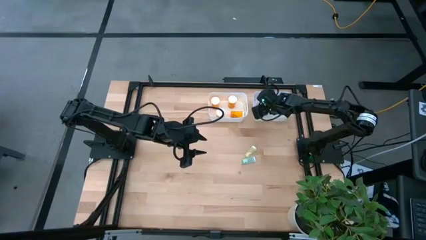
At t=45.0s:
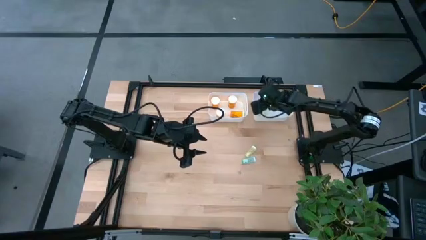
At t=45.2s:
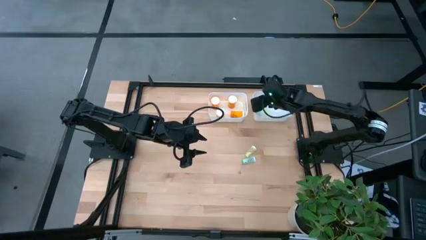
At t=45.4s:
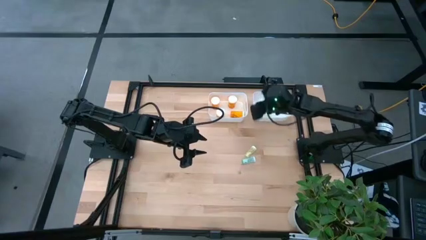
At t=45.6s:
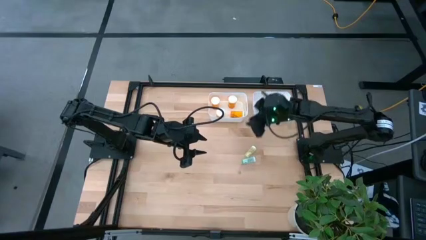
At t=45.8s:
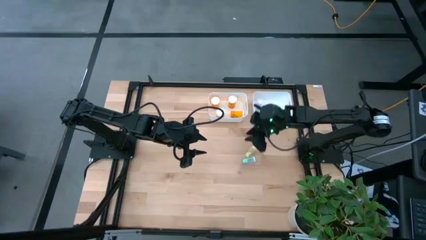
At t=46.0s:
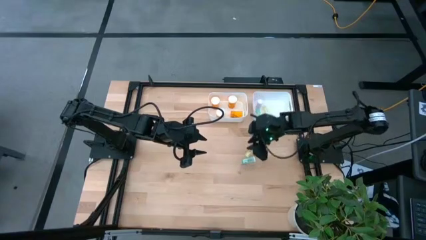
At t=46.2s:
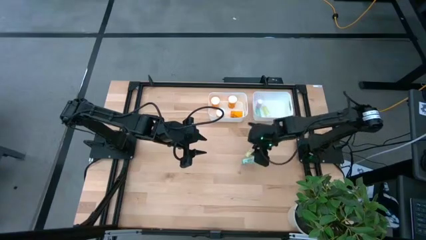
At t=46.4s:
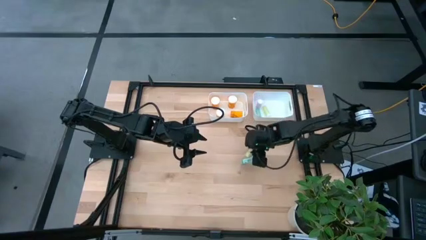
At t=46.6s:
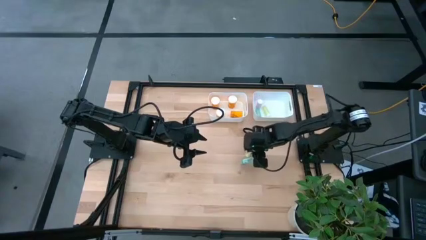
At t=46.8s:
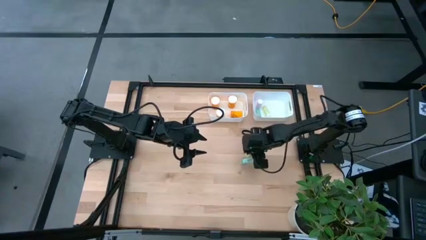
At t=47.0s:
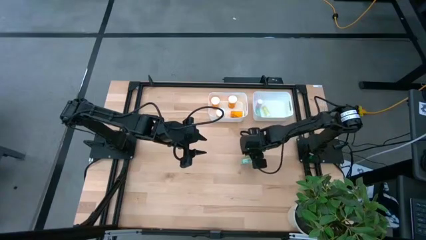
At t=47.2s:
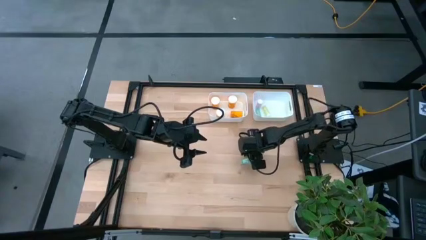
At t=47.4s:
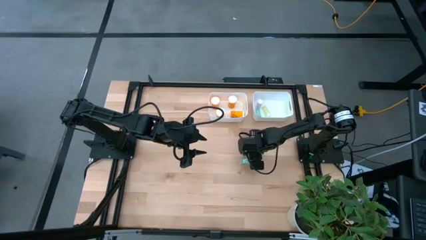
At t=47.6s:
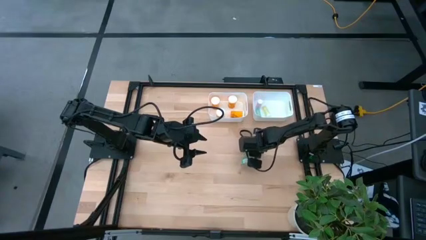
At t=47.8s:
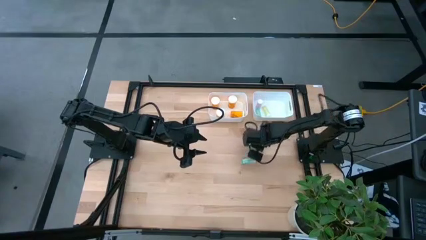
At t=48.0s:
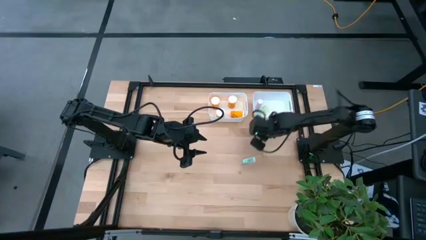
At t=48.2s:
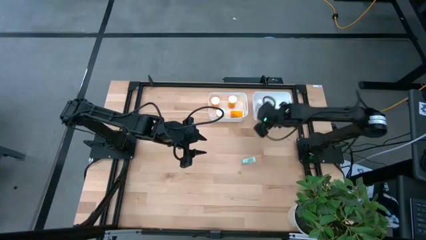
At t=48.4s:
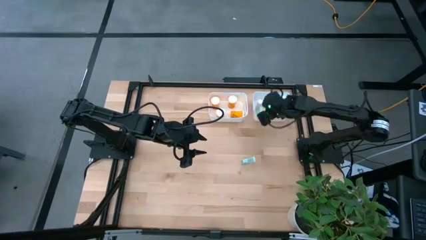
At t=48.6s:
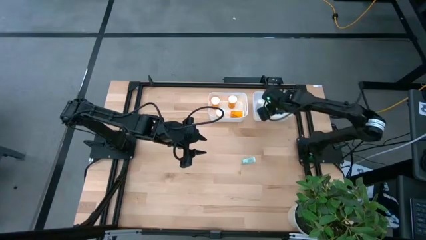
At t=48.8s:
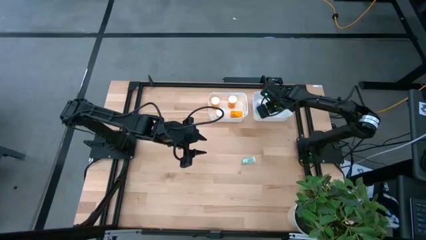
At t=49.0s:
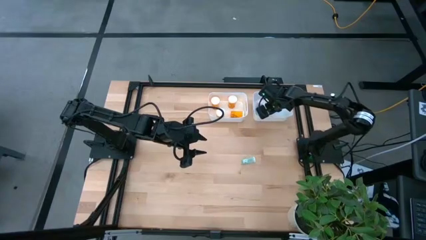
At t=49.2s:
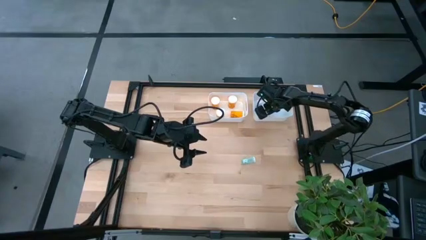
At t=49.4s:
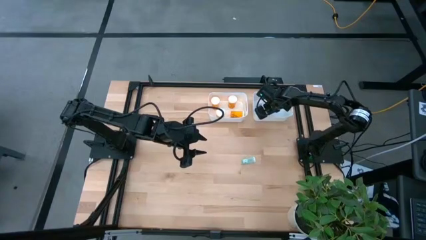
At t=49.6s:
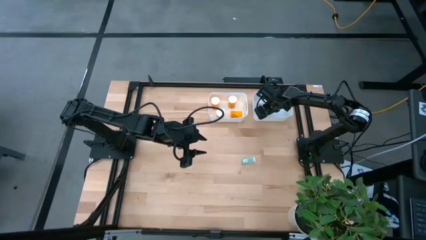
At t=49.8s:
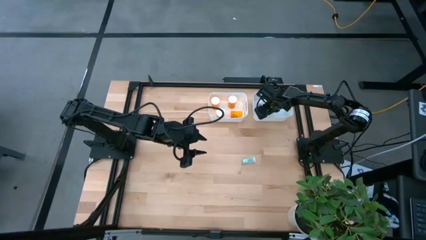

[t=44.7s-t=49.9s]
Task: Pick and place medicine bottles into bin by pill shape (circle, oval)
Put the yellow tablet bottle into the right white bin

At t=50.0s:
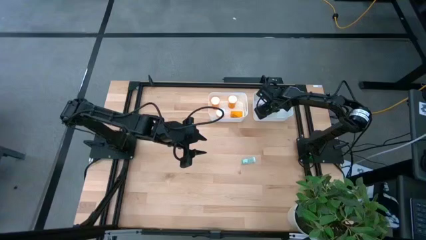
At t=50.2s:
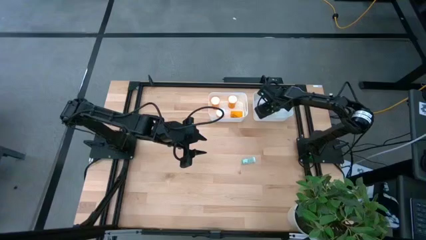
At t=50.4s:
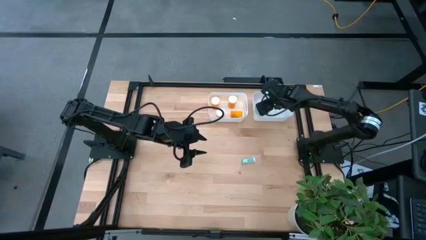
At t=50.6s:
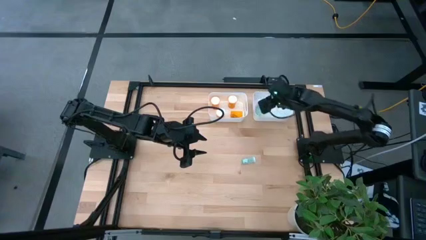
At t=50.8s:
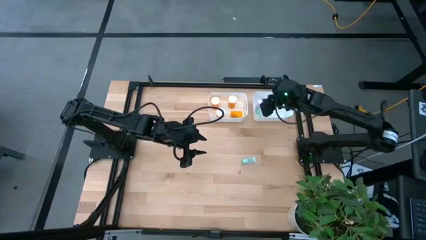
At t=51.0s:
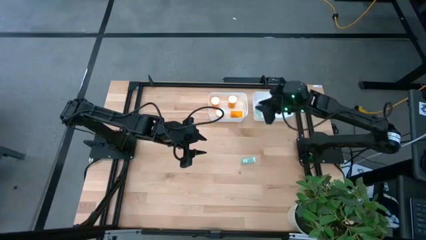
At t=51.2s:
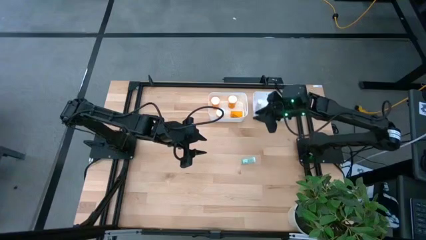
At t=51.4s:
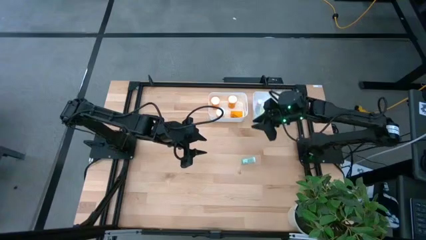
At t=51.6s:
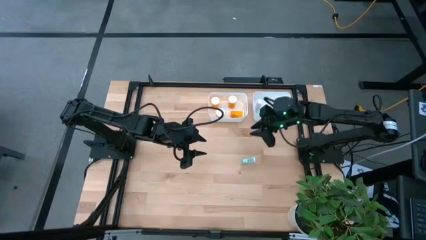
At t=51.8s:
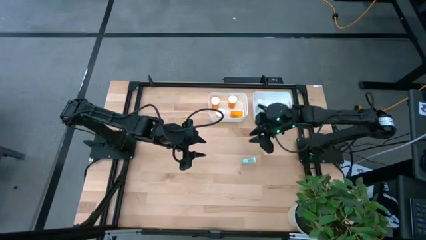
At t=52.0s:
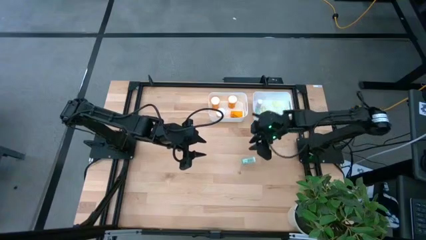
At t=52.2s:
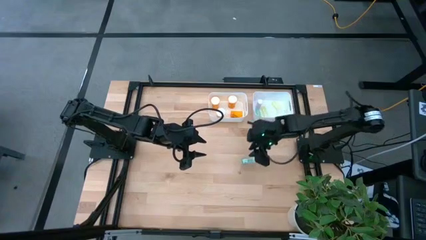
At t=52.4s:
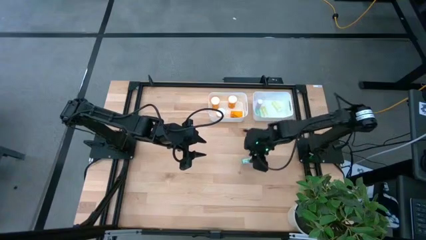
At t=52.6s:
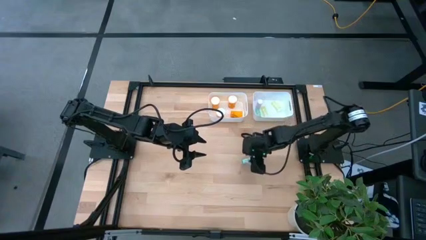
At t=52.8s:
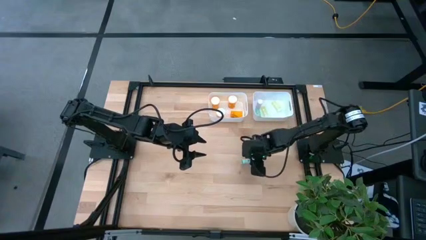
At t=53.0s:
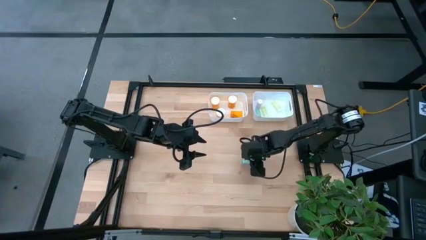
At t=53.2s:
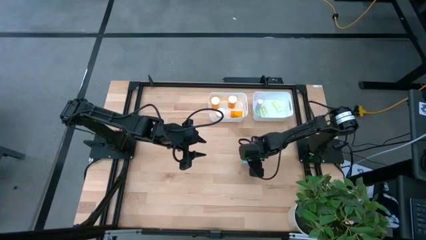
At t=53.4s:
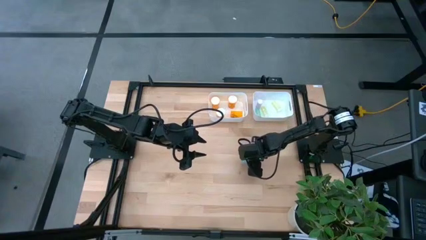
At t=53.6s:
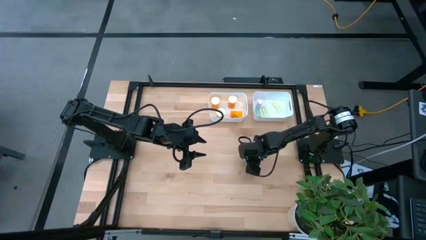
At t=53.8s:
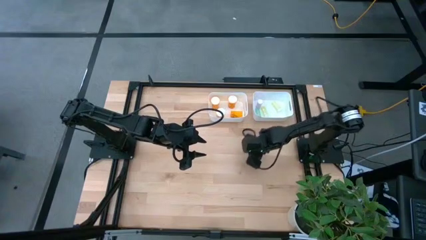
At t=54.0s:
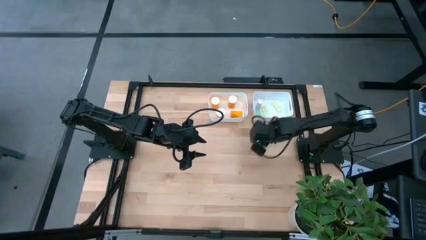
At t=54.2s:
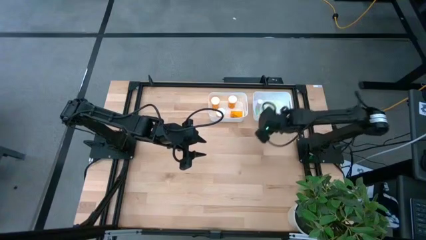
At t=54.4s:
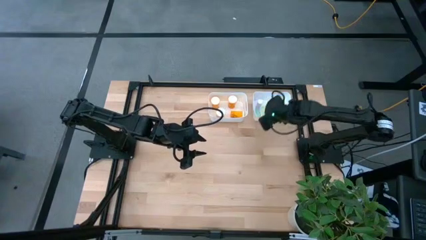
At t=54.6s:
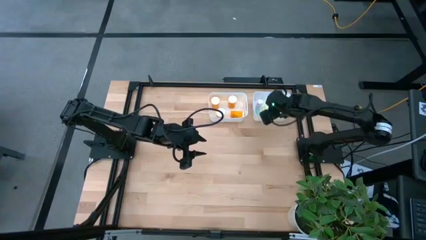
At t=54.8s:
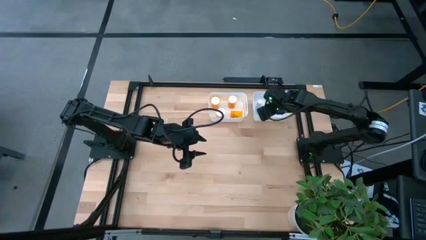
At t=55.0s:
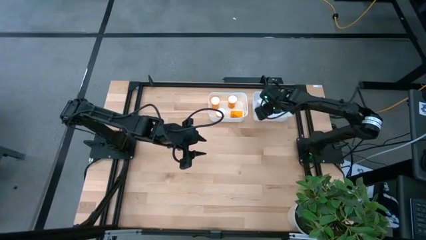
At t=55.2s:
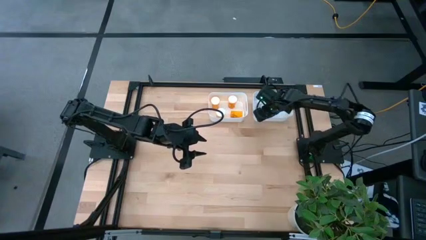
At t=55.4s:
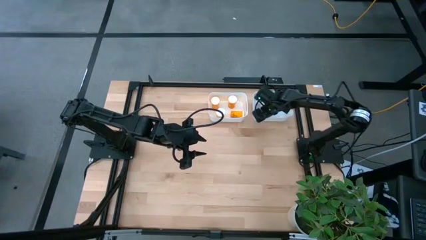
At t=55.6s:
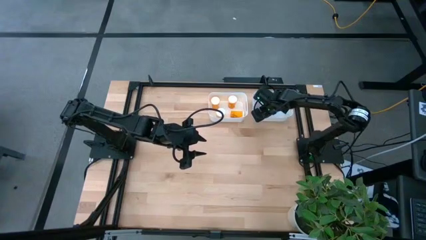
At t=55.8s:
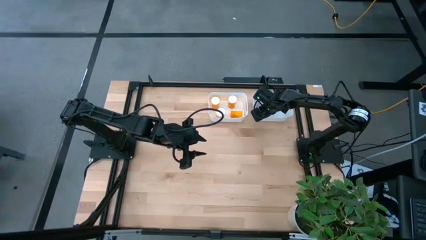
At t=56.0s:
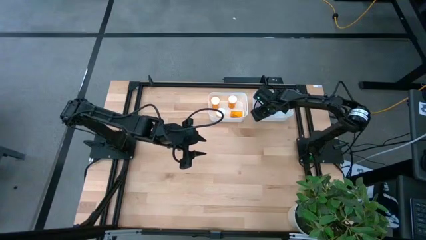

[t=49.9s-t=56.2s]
Put the blue tablet bottle into the right white bin

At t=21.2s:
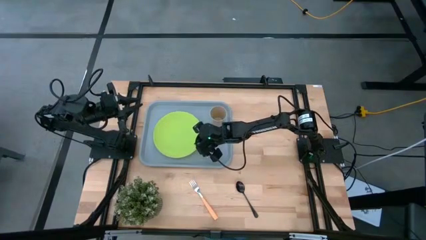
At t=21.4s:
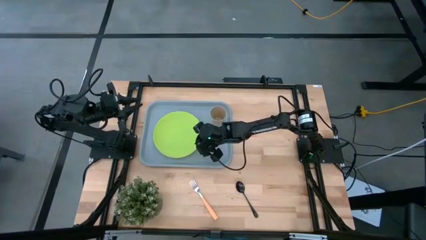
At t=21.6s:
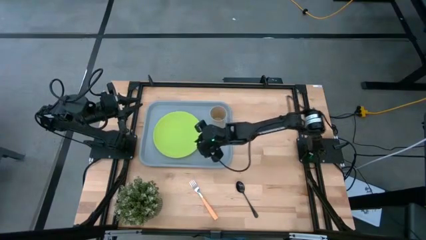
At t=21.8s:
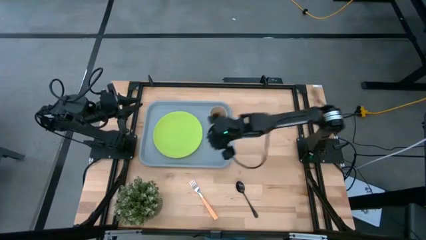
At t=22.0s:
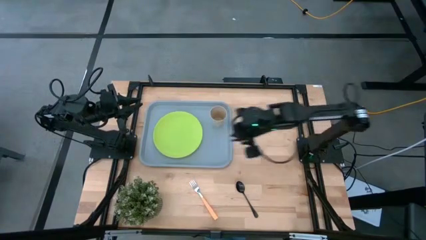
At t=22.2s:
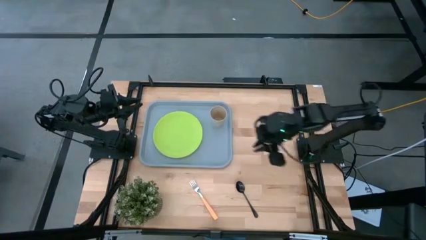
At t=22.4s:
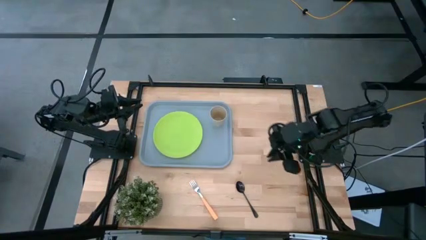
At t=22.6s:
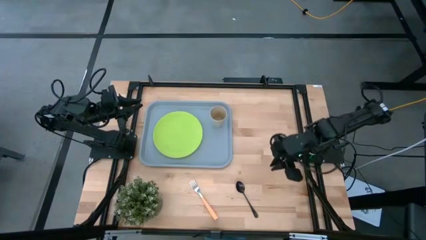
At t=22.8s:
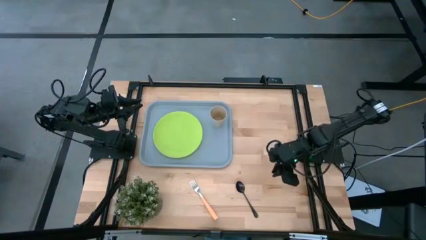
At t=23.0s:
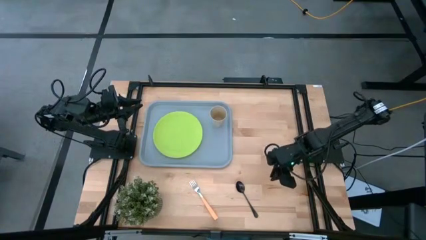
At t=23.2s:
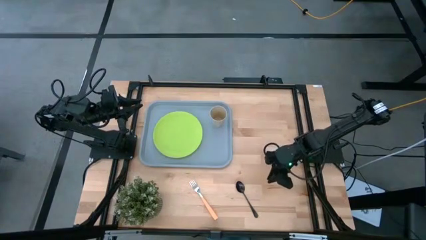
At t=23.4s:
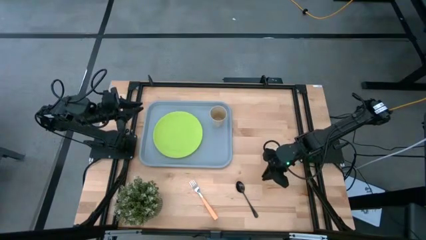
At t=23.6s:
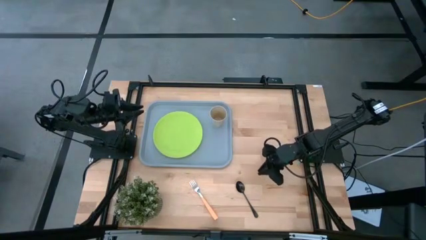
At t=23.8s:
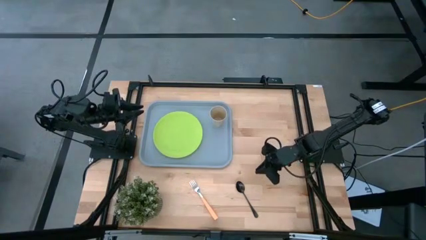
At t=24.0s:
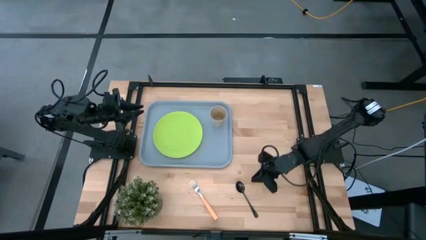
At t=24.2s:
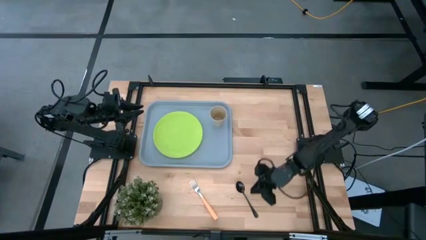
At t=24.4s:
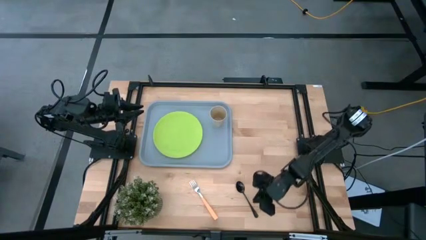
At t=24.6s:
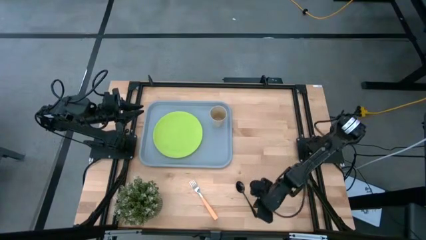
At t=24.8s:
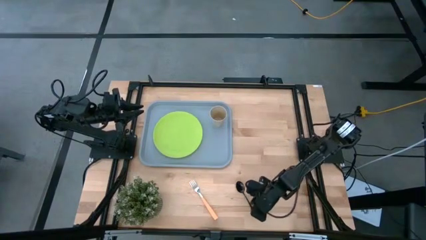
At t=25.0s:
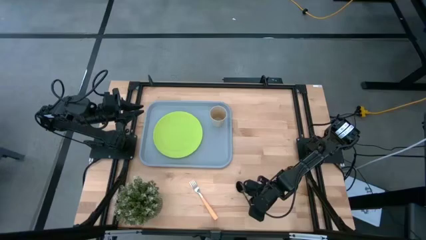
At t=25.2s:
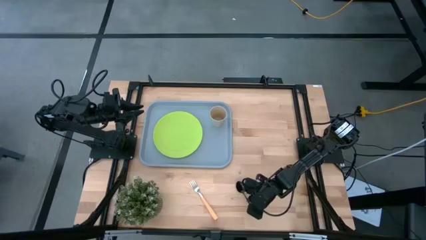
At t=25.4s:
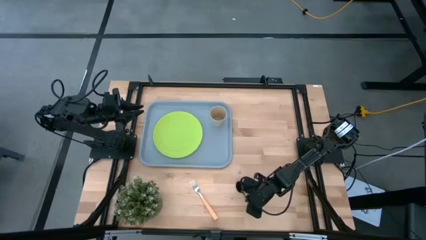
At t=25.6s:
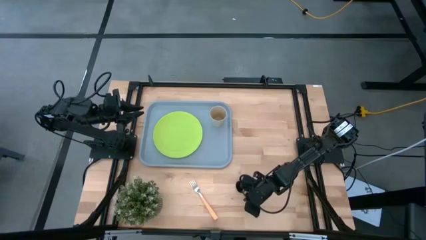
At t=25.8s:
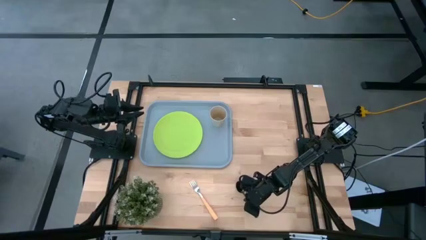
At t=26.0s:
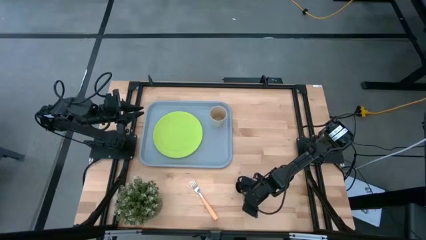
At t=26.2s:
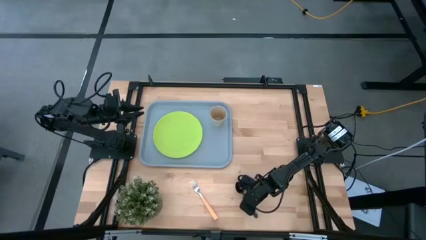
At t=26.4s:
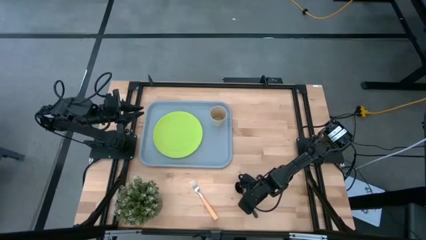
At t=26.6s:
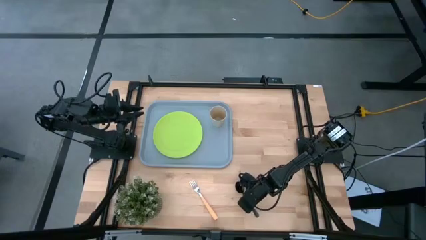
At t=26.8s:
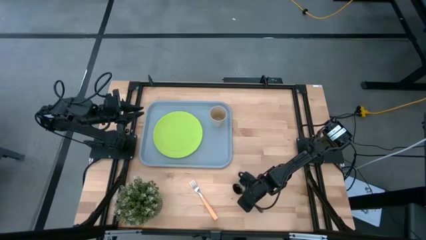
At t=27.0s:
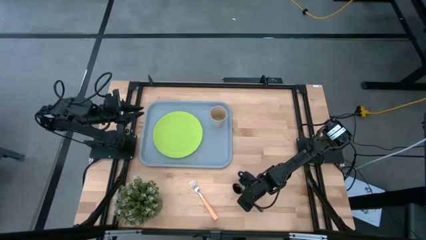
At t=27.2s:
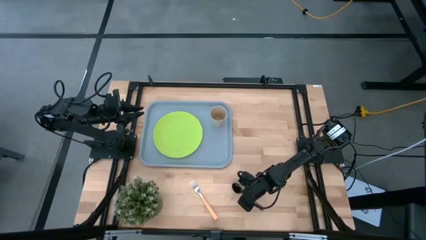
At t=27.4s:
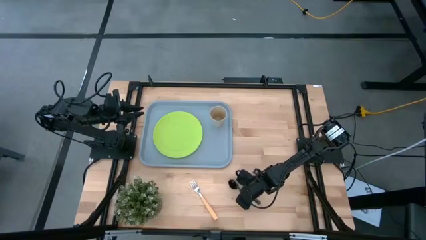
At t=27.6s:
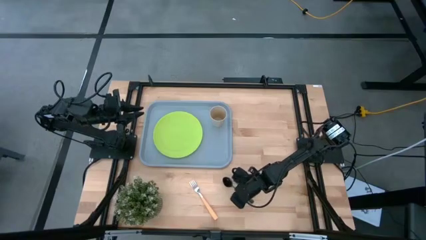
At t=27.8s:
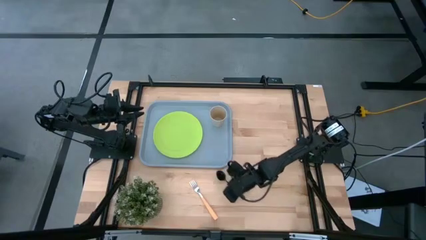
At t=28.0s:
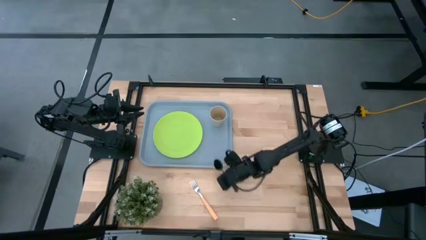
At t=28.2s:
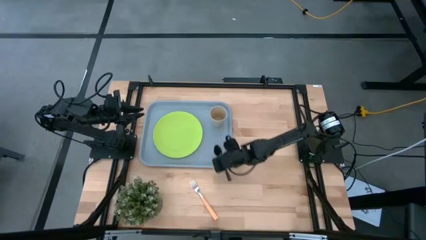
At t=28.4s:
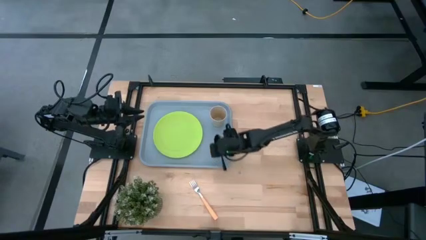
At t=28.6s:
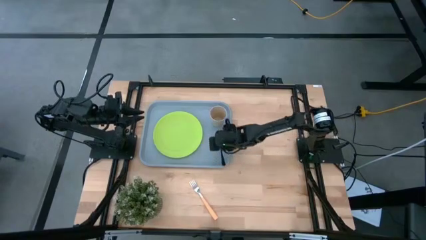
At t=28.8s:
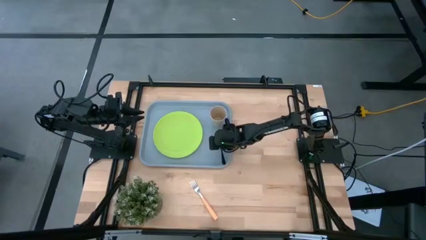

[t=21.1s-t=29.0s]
Task: Pick and place plate/cup/fork/spoon on tray
Put the black spoon on the gray tray to the right of the green plate
